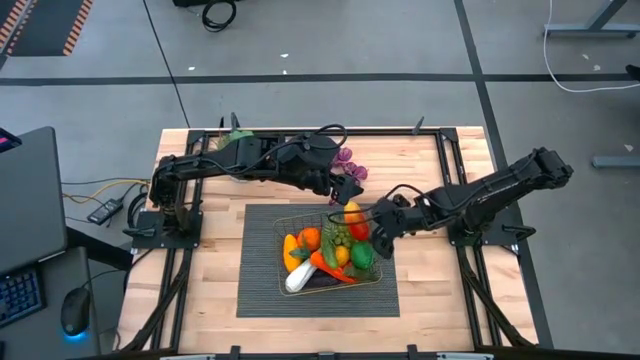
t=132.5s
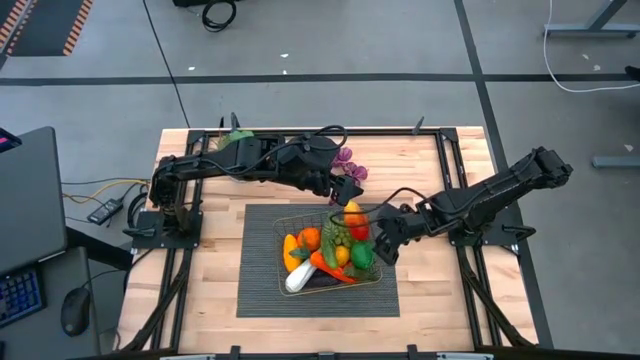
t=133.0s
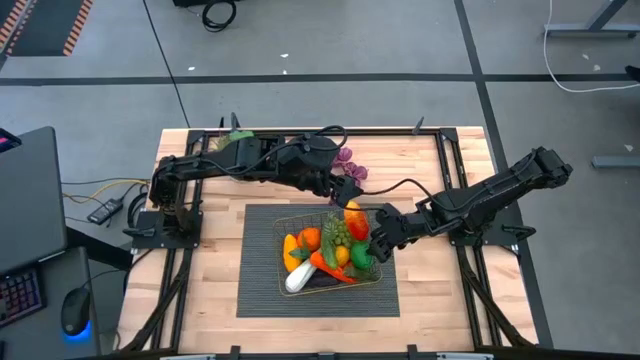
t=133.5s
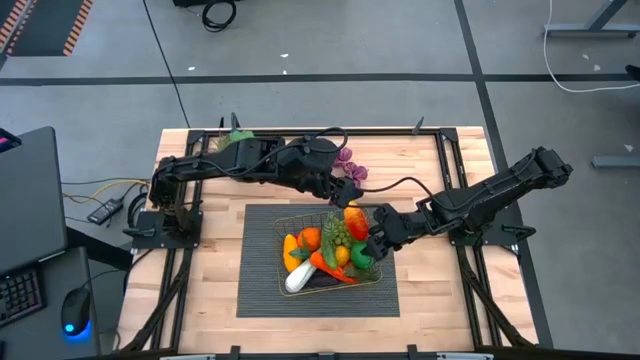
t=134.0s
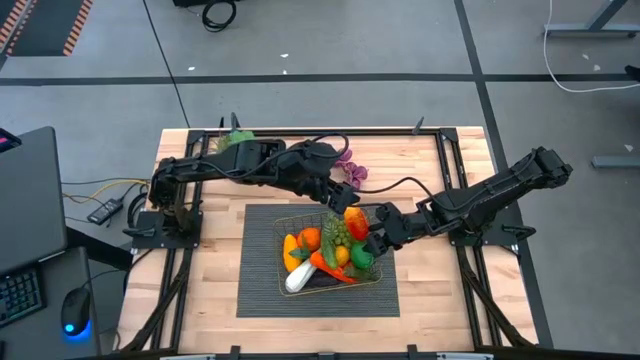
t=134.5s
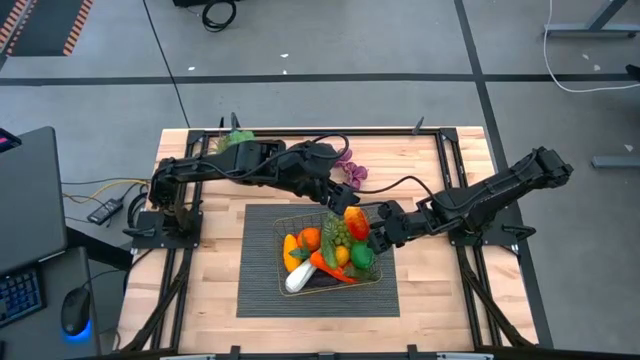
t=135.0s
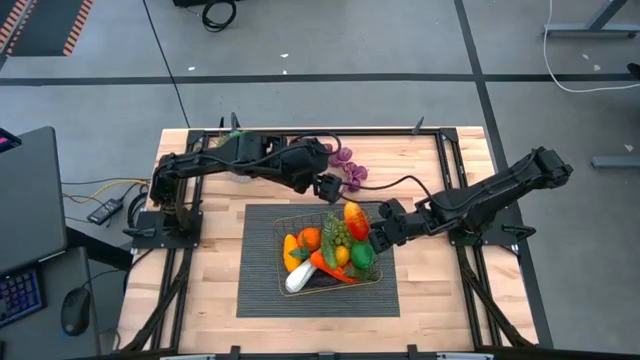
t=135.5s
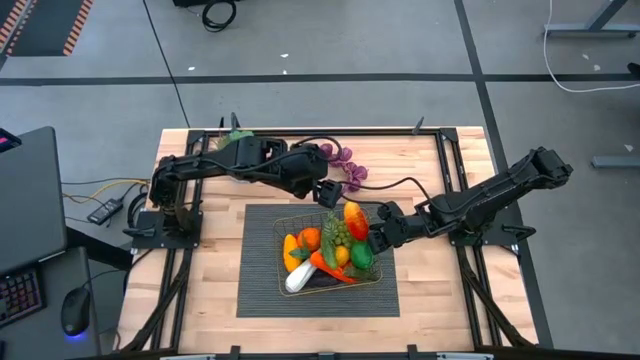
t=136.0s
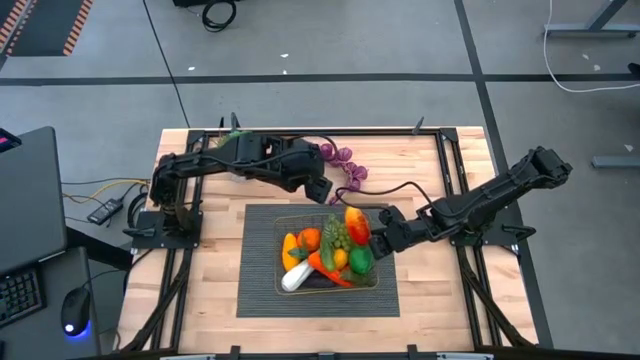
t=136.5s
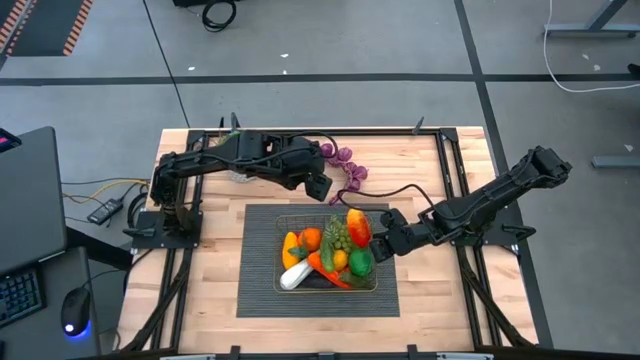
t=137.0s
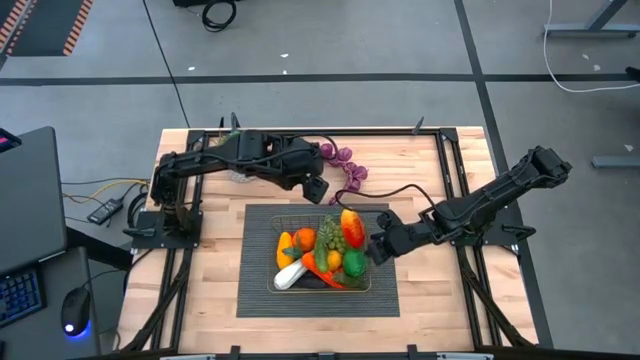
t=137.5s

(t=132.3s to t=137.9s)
Task: Build produce basket
Adjust the gold wire basket on the gray mat

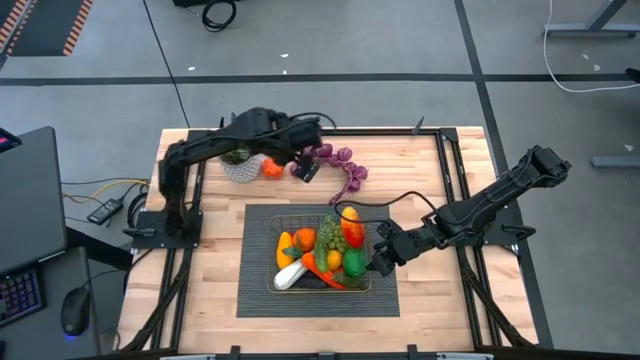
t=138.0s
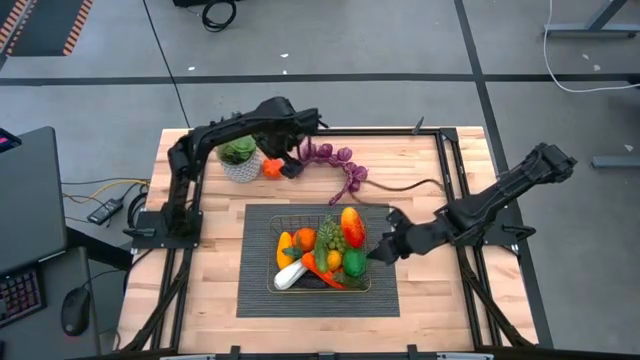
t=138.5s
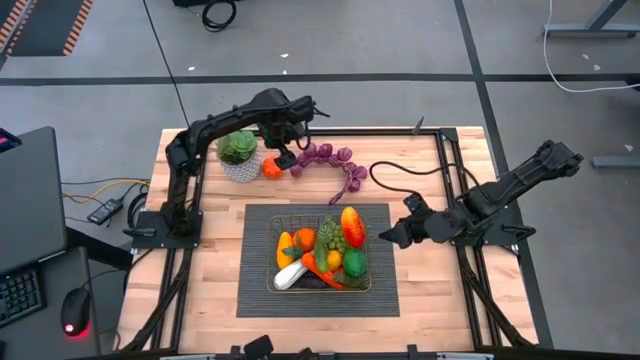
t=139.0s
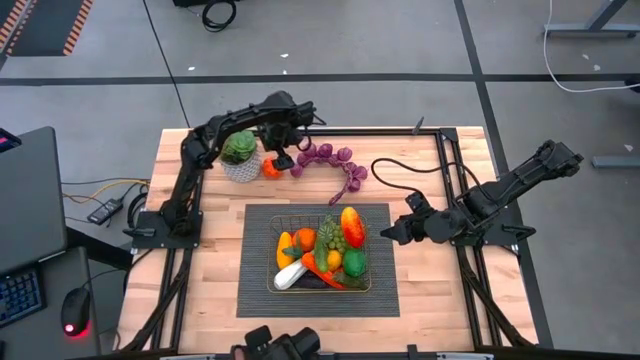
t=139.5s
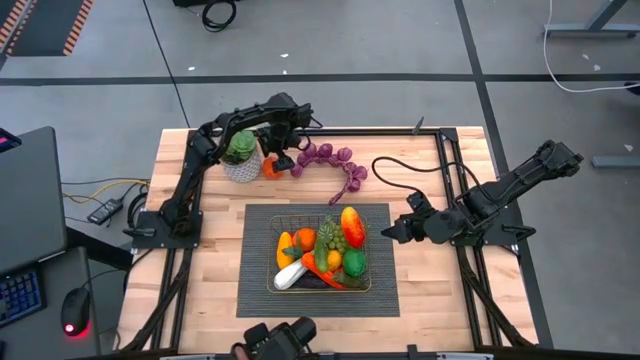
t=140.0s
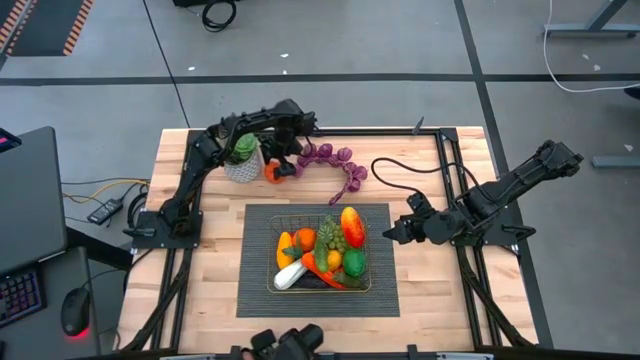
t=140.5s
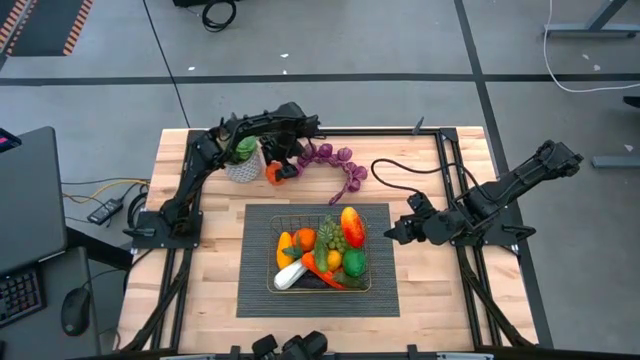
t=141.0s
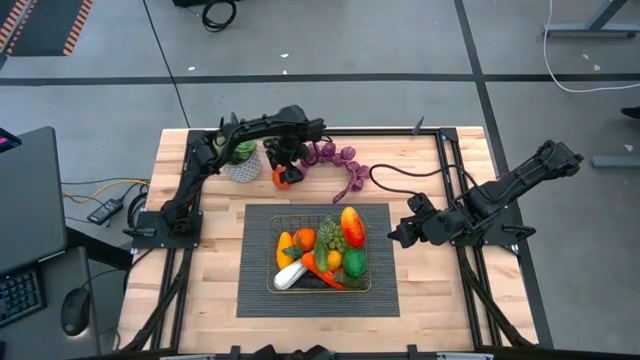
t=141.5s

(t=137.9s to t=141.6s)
Put the orange pumpkin into the gold wire basket

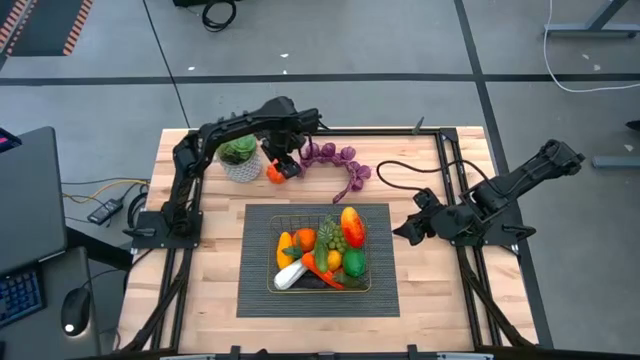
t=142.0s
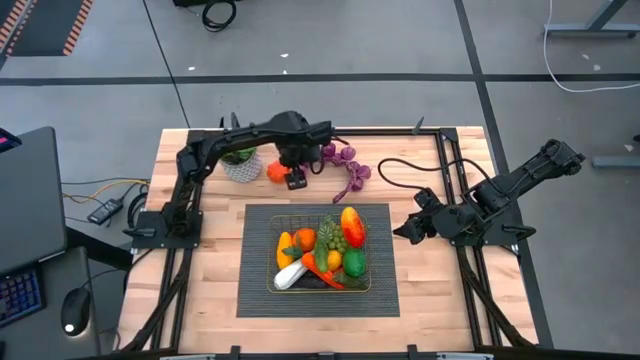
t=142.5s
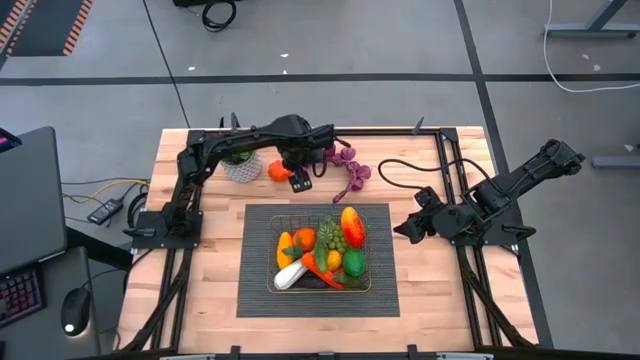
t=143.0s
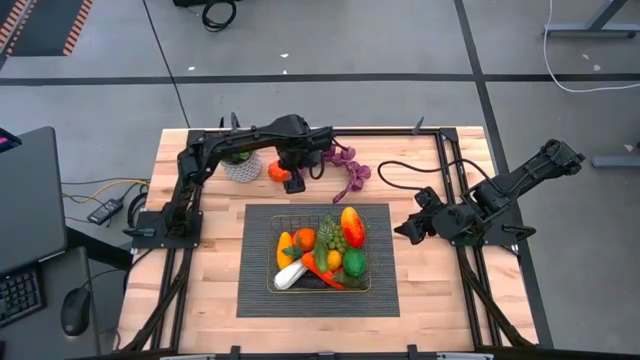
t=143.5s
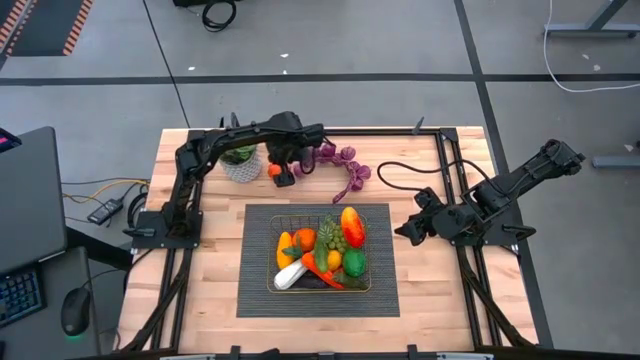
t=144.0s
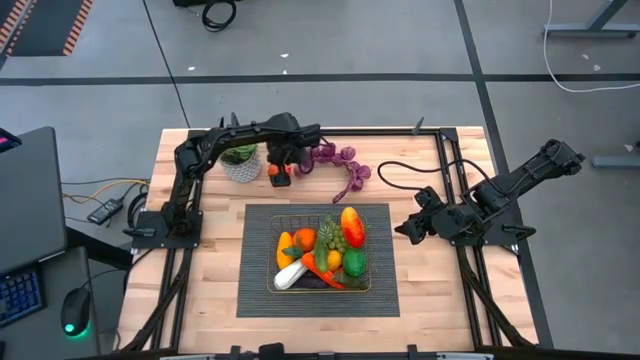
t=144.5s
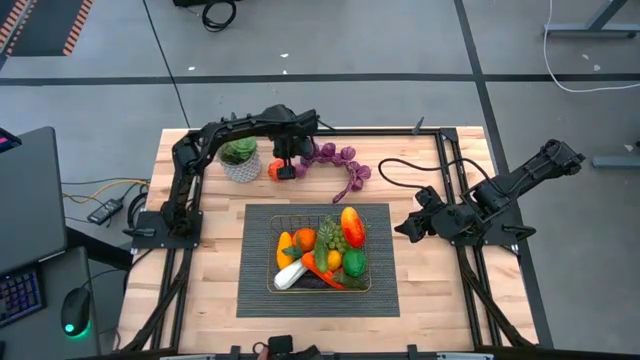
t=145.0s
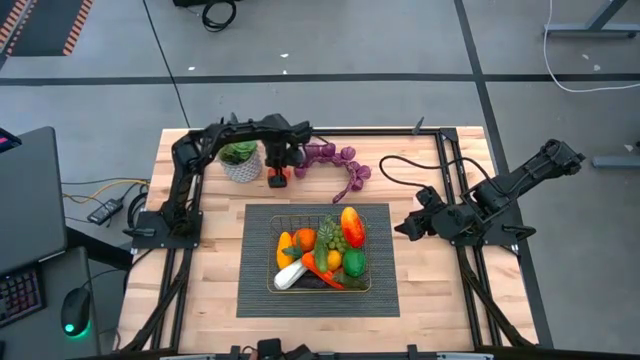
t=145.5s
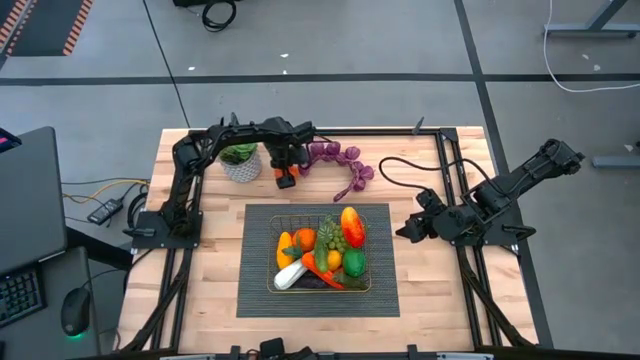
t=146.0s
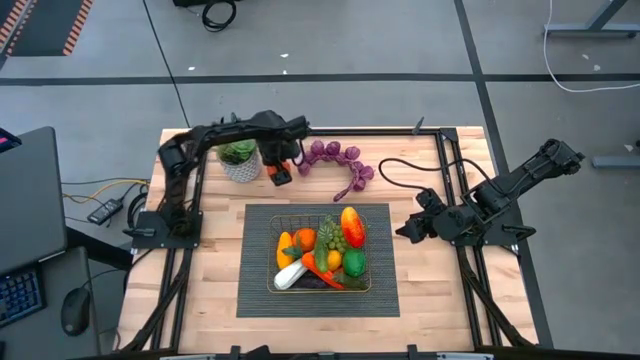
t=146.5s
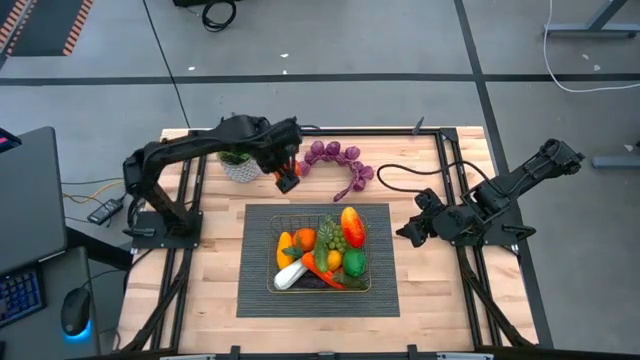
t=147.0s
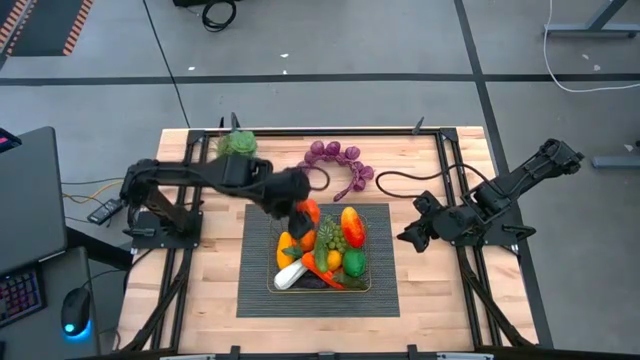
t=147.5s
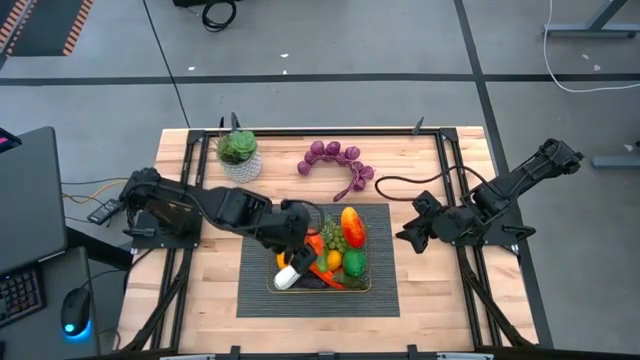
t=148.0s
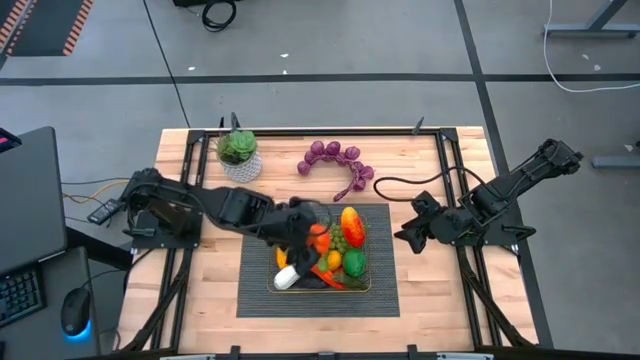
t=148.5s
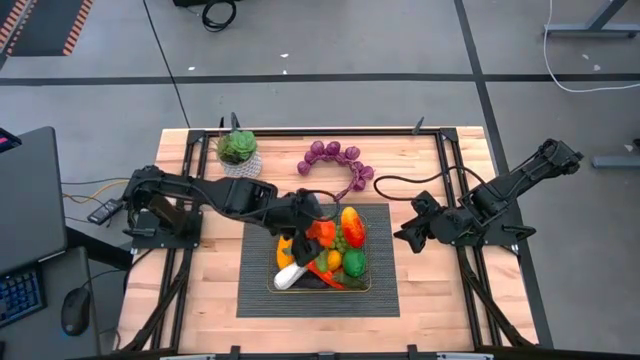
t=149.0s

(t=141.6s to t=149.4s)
Put the orange pumpkin into the gold wire basket

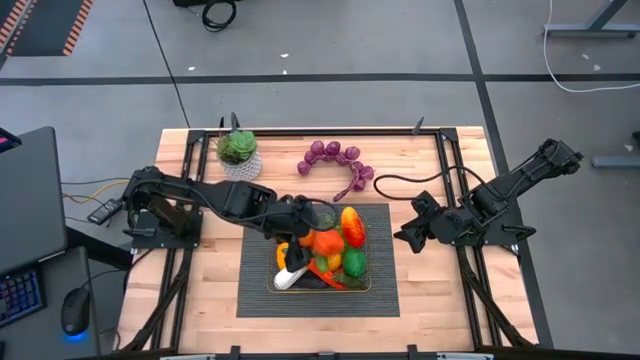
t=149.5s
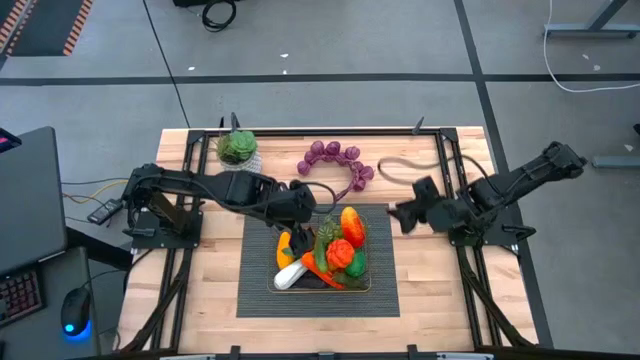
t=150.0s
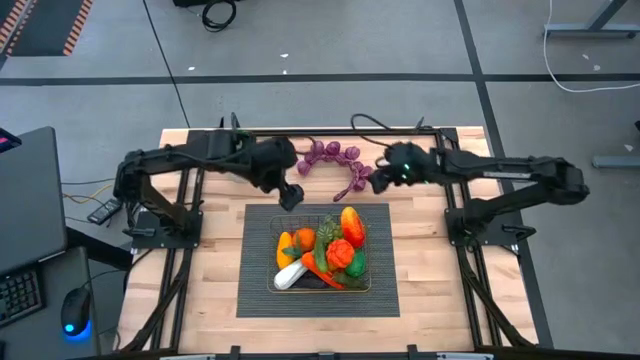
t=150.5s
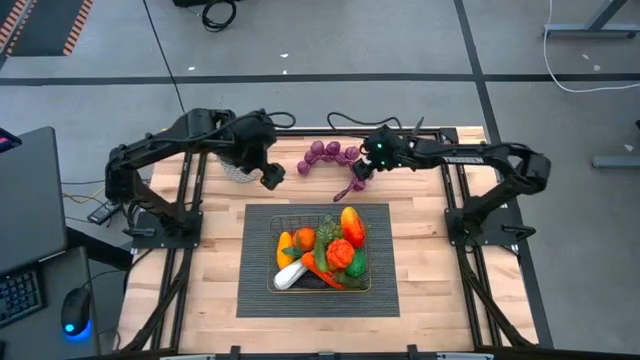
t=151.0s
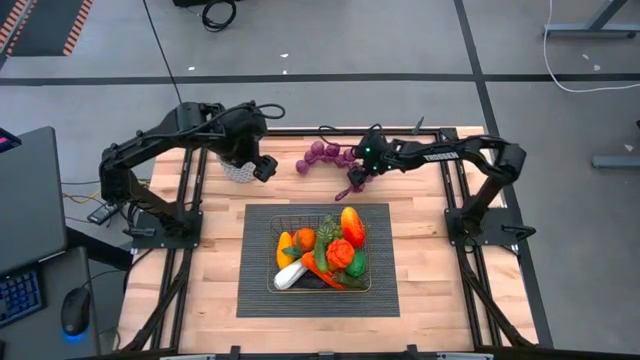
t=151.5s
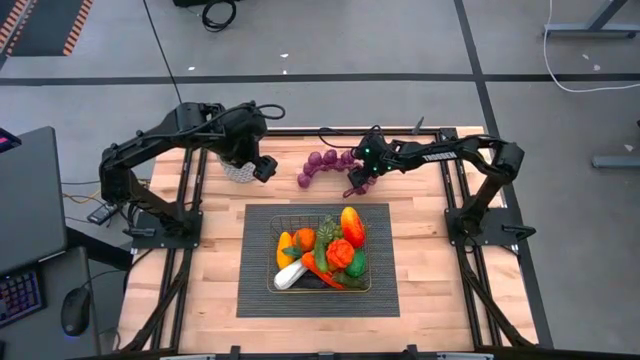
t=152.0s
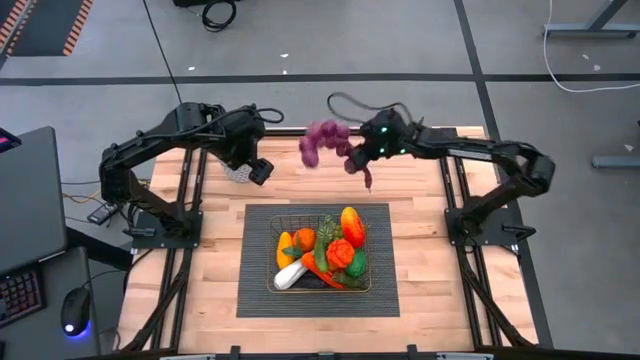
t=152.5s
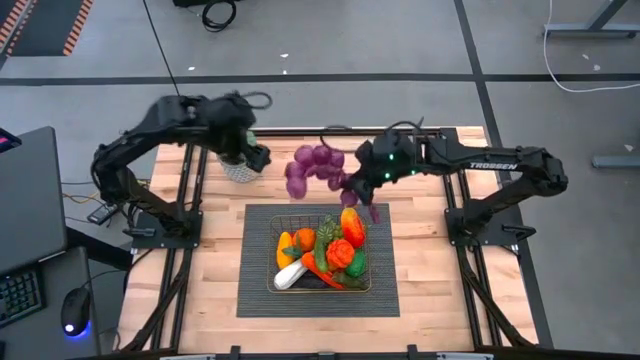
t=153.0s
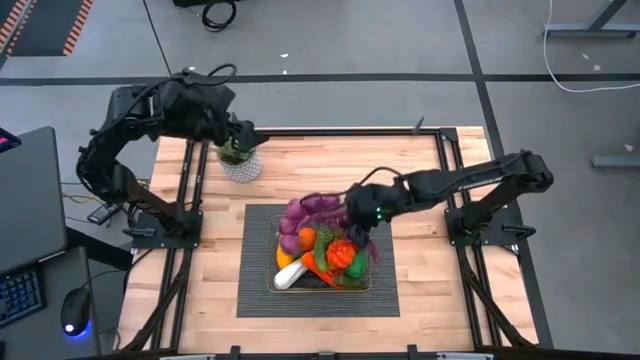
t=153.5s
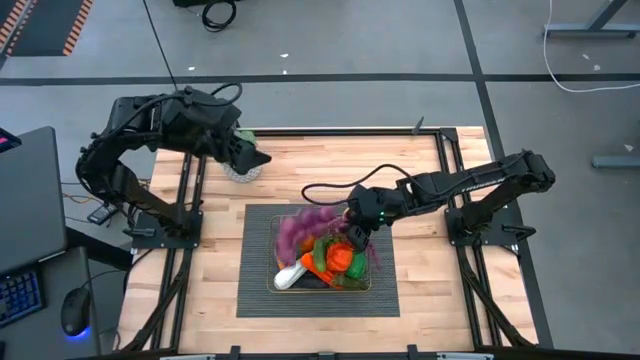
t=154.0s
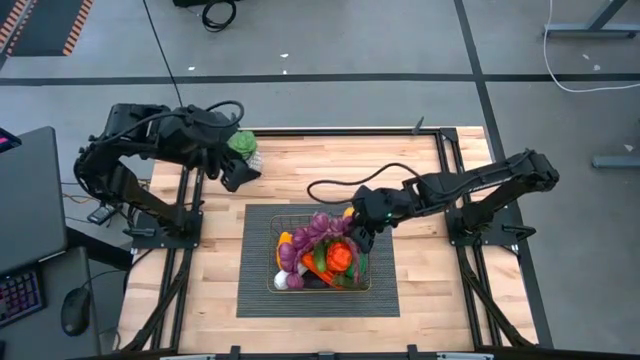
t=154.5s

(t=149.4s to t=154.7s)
Put the purple garlic into the gold wire basket
